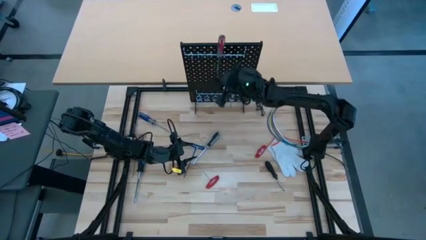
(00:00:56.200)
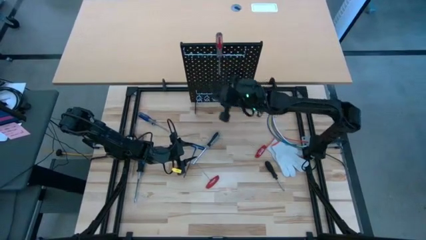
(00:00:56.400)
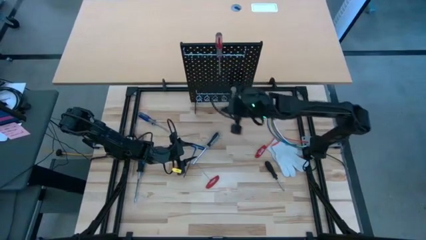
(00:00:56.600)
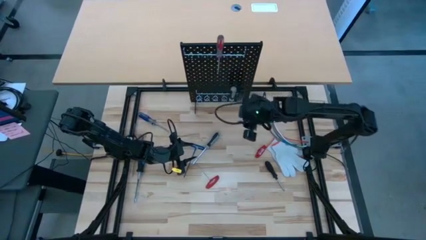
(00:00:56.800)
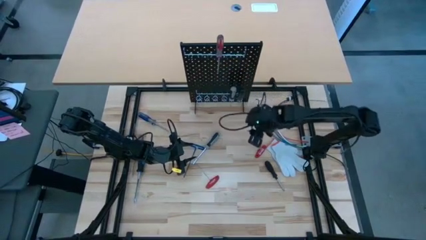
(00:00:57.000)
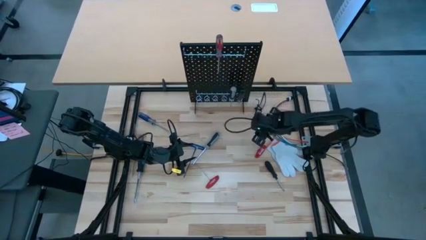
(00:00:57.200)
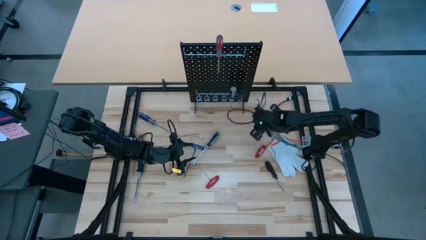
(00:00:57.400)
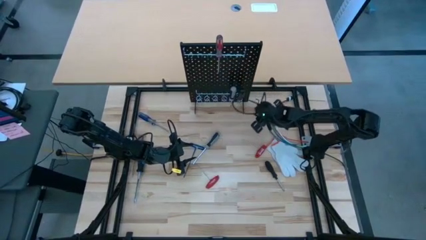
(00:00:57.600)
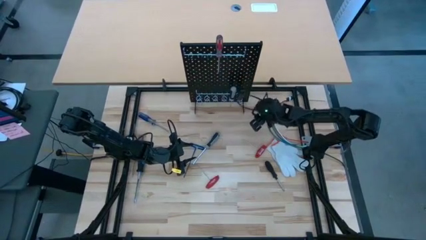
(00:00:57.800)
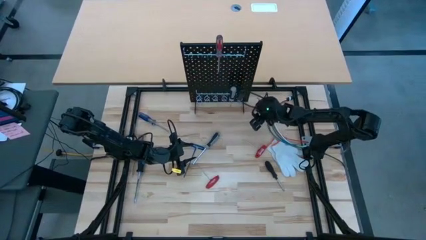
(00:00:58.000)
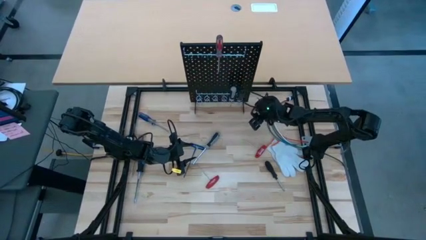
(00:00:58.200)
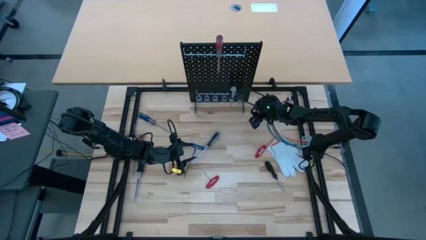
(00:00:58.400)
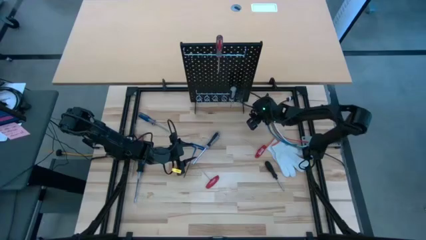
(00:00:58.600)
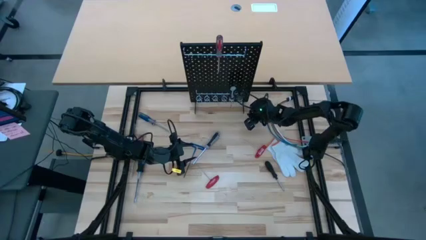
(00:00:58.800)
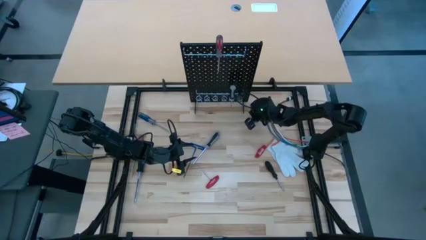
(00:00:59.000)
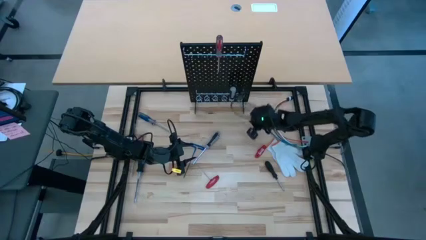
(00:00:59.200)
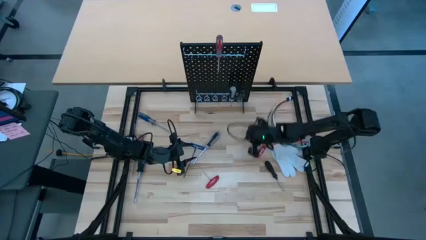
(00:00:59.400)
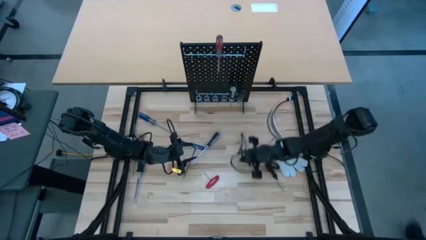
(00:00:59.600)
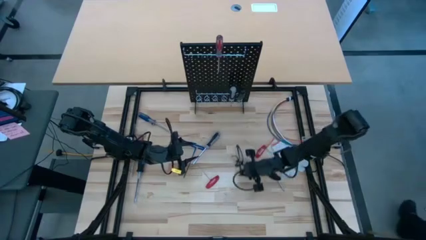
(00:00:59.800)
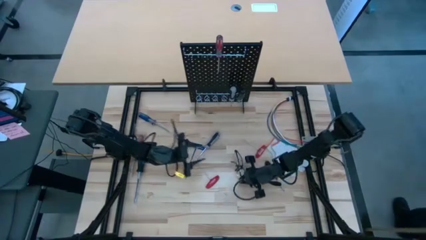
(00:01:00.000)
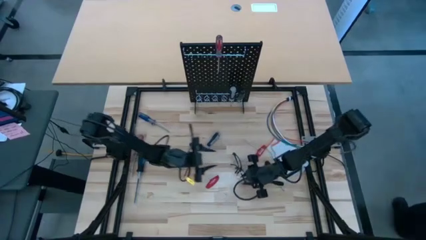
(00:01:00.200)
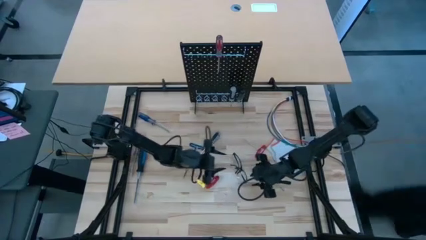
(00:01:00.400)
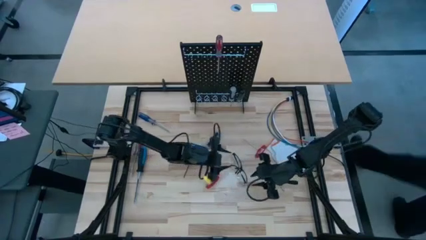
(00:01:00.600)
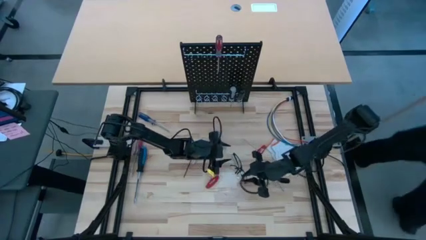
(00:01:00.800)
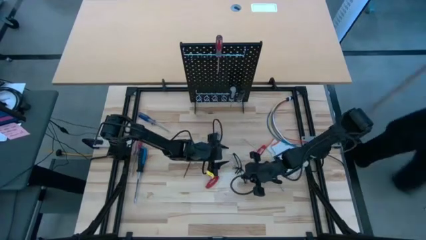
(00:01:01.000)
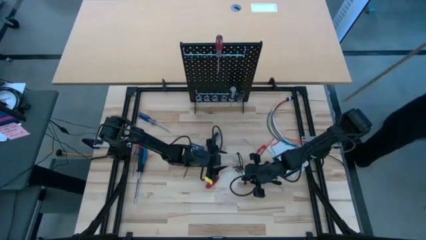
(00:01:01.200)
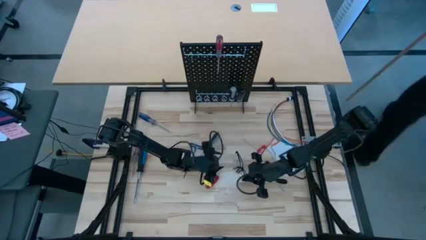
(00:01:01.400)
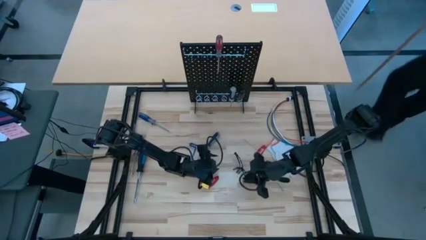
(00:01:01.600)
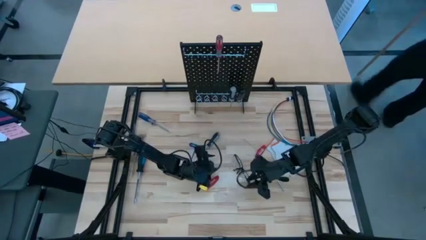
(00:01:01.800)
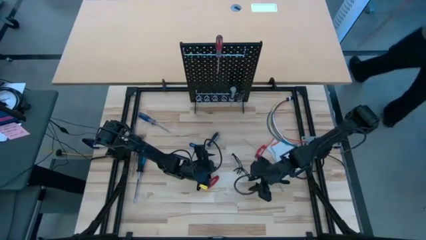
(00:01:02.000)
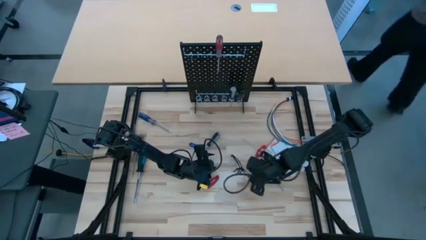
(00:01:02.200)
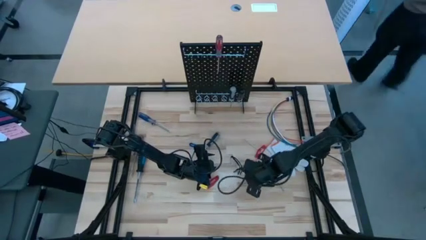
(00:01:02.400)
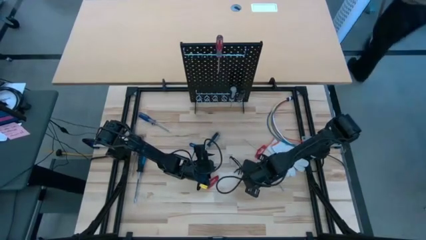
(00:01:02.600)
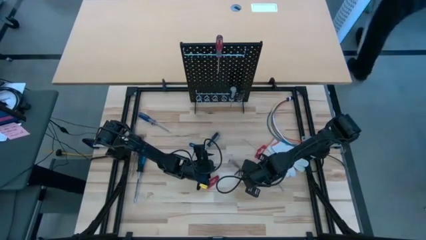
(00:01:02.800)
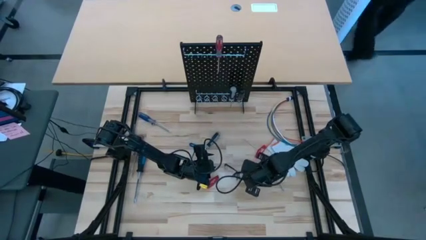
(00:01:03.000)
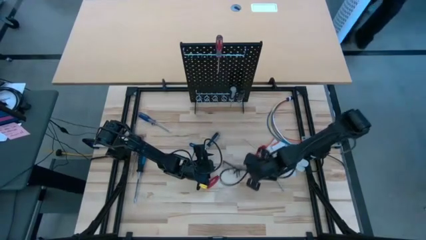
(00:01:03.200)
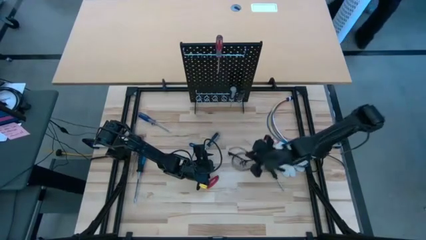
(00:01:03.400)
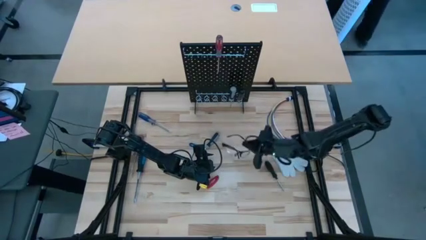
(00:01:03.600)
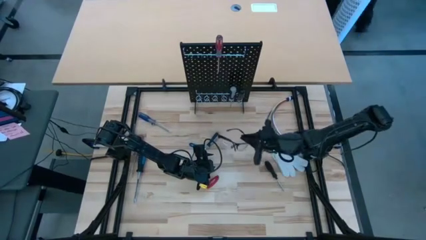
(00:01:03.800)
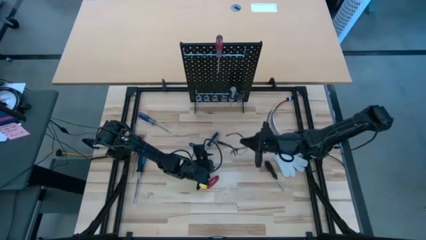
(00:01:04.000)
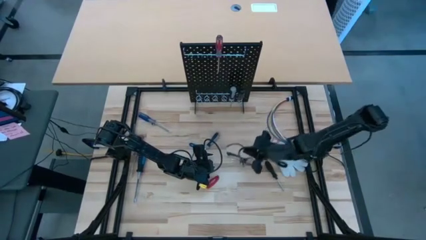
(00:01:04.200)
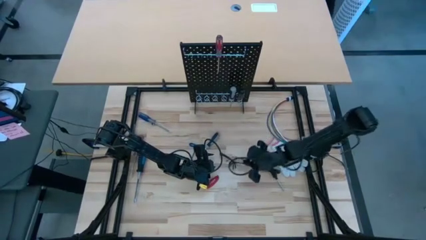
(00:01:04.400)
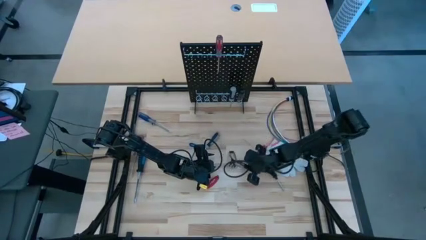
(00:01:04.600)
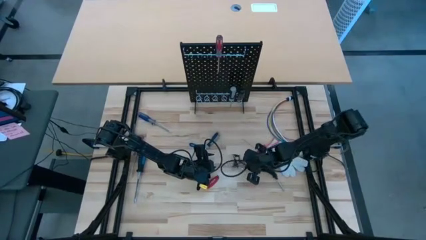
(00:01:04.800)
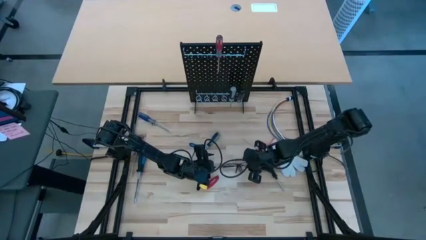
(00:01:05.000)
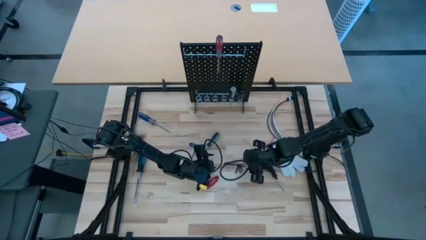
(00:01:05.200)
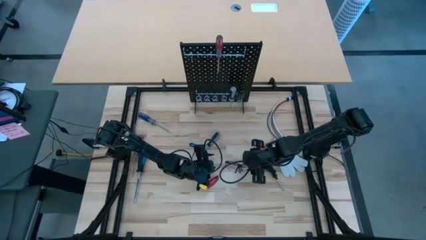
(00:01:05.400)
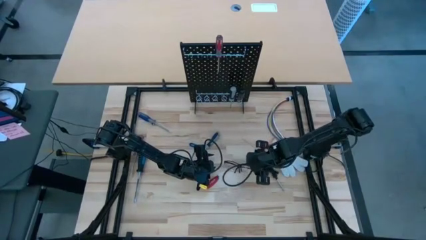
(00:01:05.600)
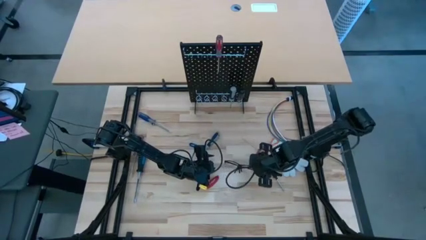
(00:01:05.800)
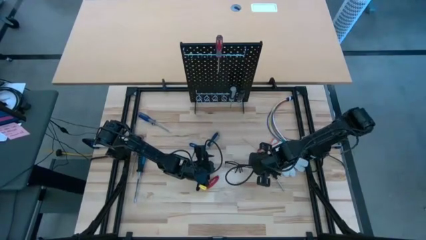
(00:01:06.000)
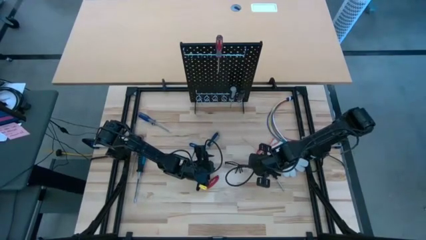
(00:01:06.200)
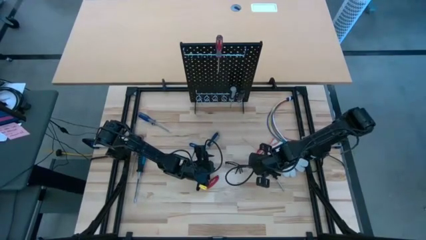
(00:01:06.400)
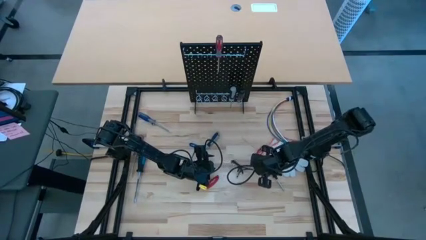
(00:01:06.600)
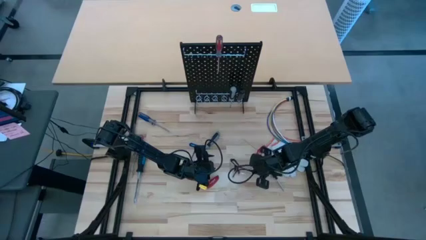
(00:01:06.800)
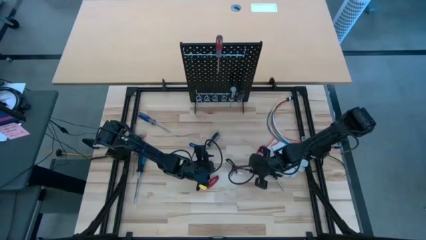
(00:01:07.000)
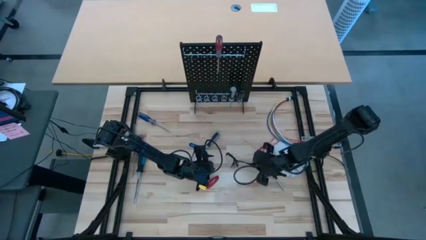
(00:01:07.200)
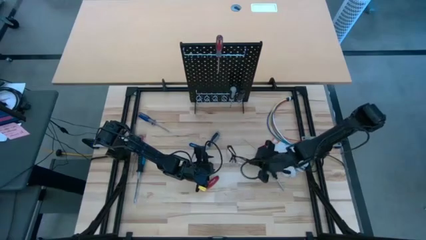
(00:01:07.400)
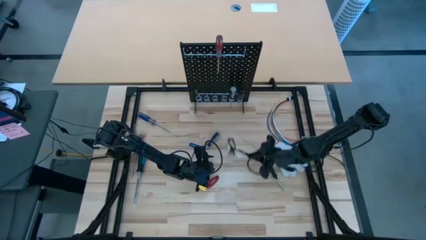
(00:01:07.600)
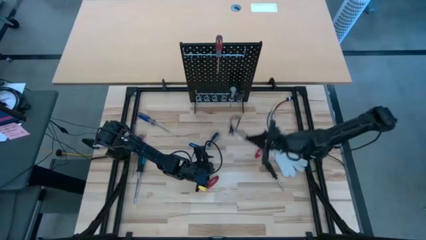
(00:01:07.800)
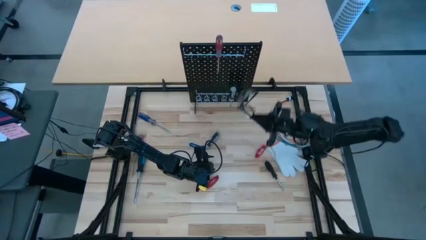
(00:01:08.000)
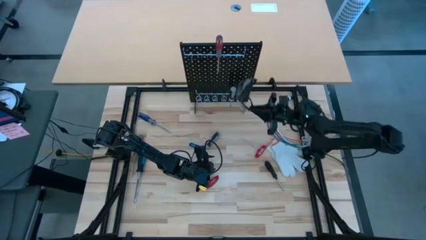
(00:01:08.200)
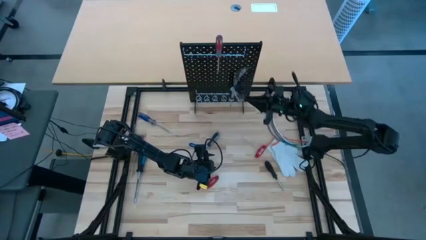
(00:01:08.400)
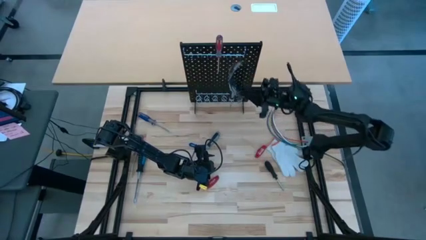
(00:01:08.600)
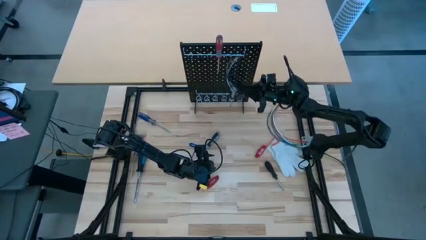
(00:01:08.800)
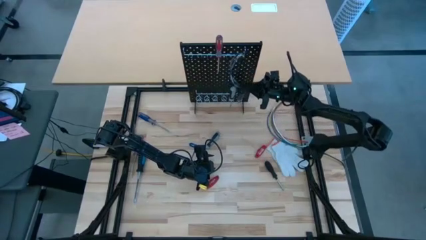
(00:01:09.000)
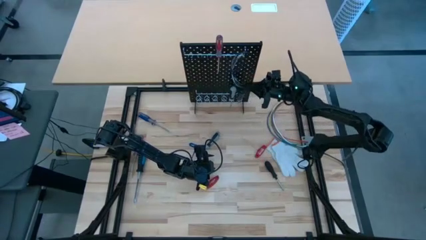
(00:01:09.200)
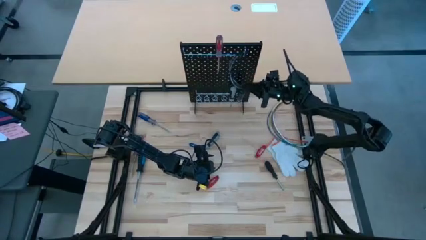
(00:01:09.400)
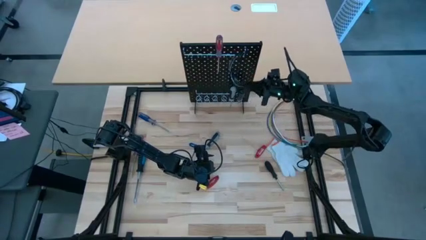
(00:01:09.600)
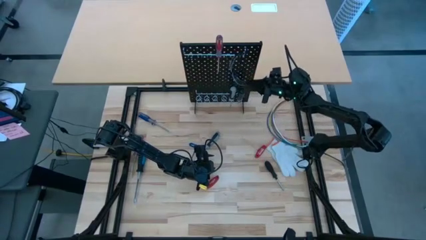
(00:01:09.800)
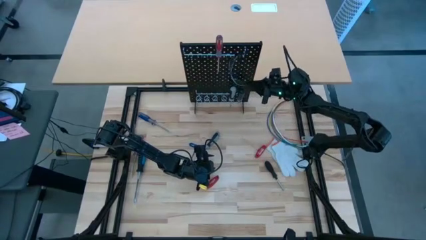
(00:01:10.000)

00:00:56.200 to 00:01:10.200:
Task: Hang tools onto peg board
Hang the clear safety goggles on the pegboard
